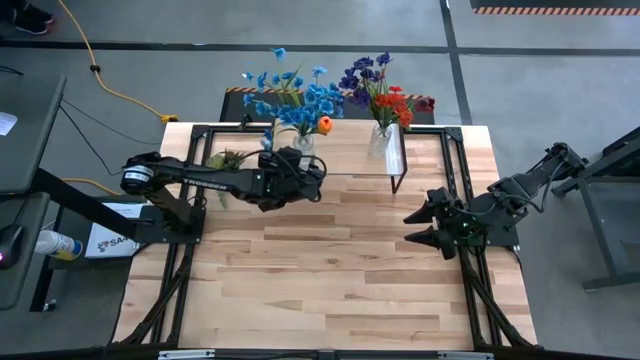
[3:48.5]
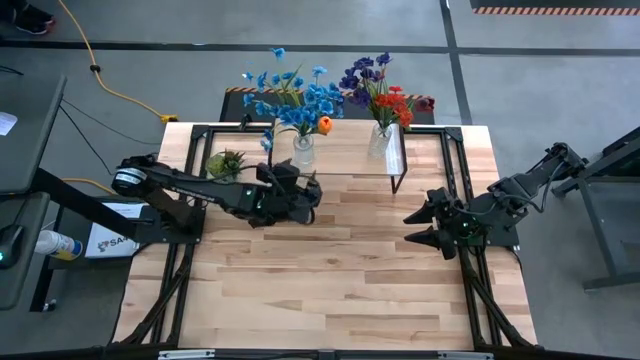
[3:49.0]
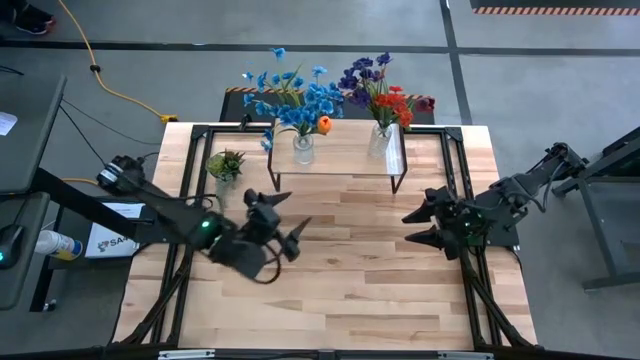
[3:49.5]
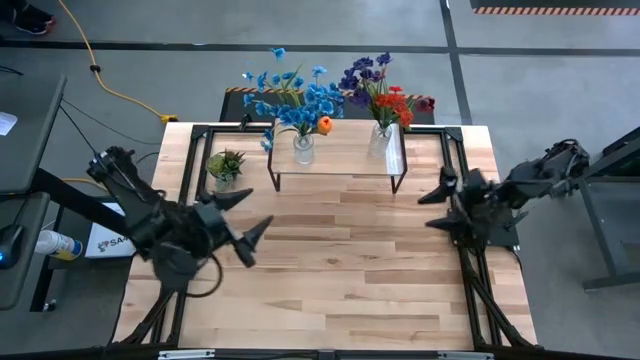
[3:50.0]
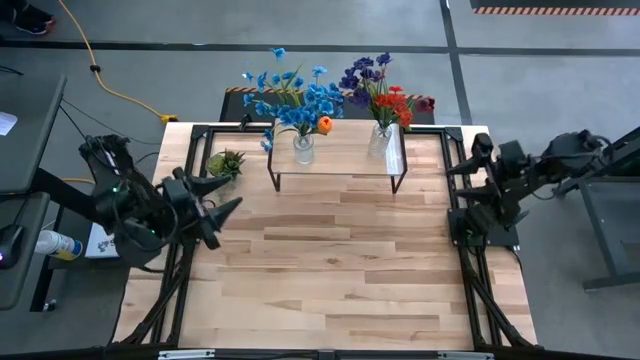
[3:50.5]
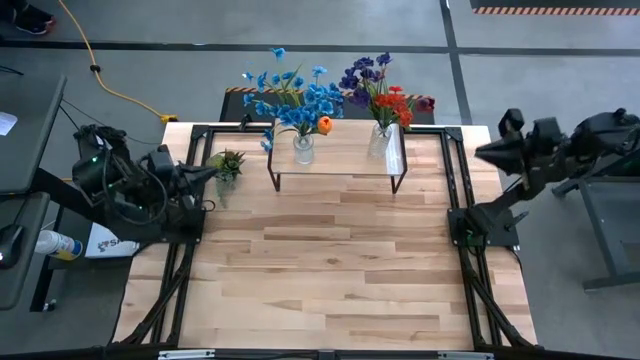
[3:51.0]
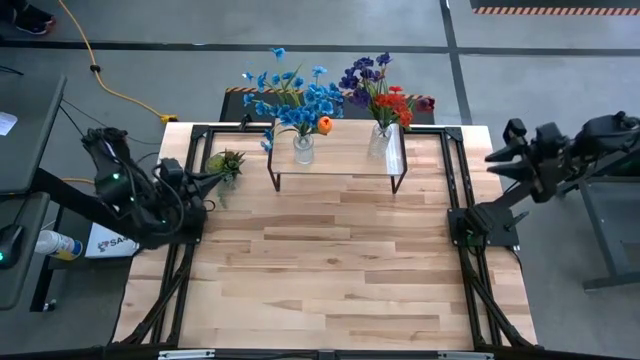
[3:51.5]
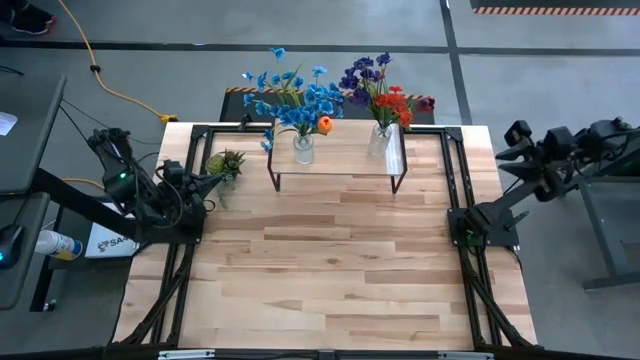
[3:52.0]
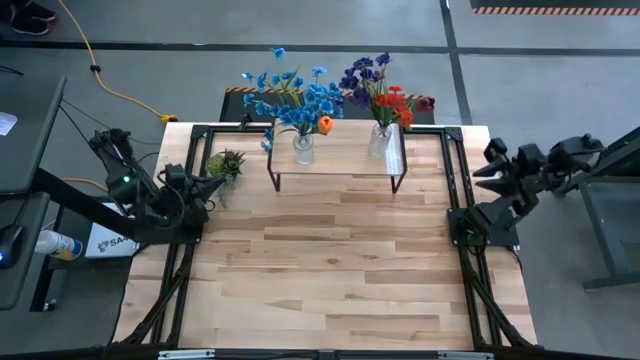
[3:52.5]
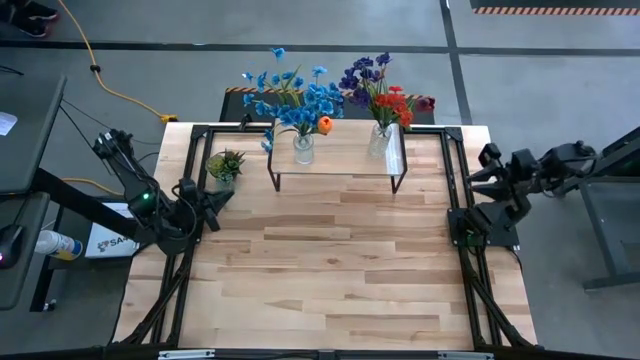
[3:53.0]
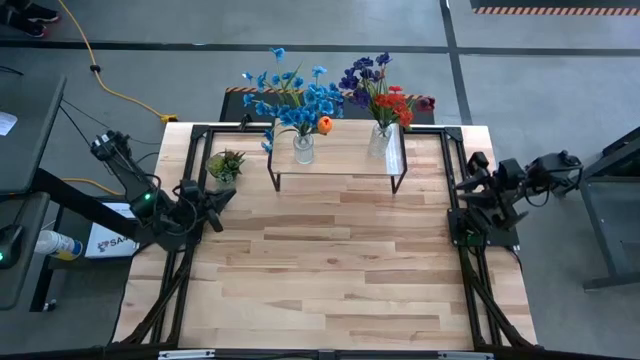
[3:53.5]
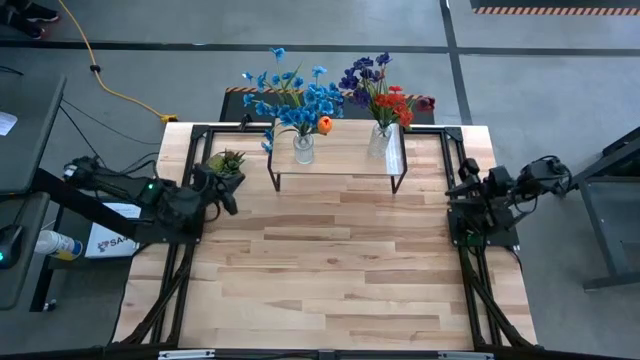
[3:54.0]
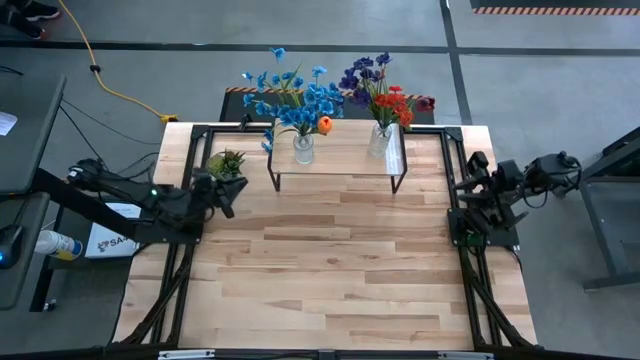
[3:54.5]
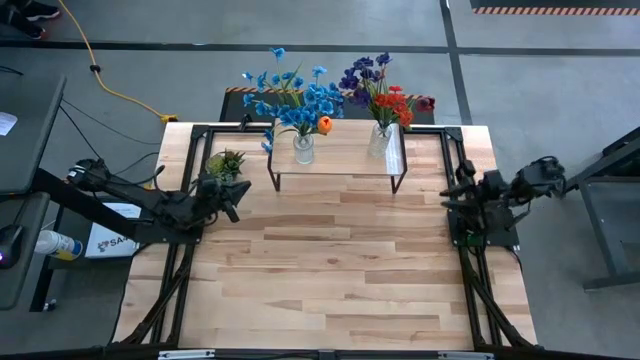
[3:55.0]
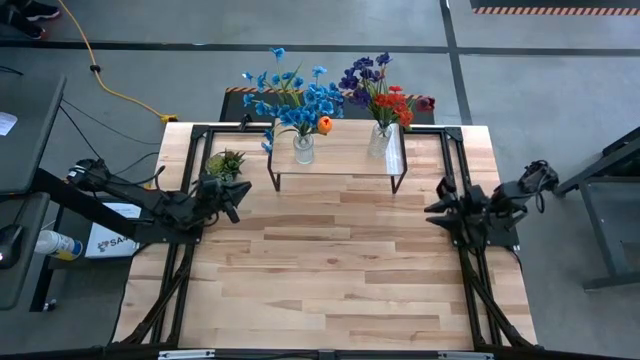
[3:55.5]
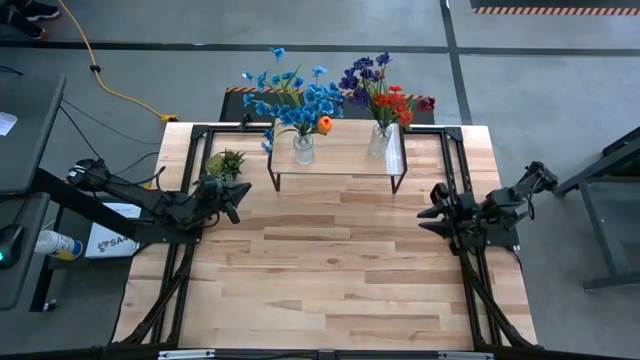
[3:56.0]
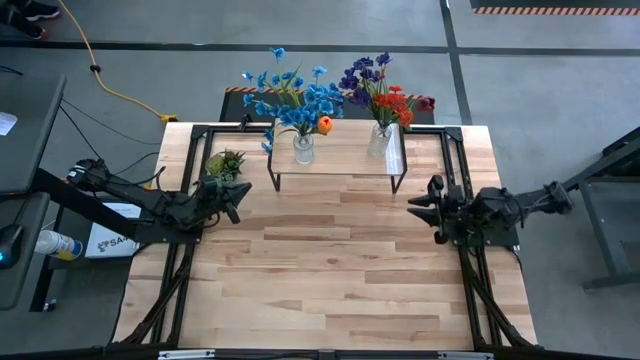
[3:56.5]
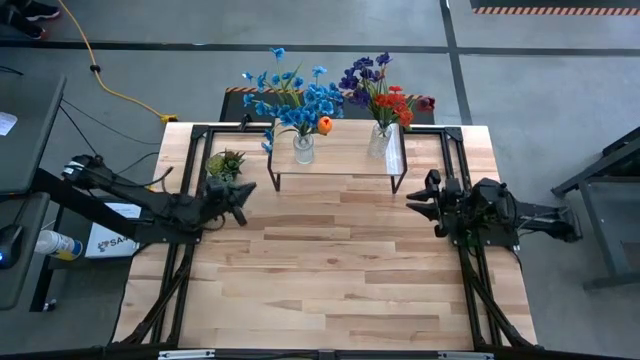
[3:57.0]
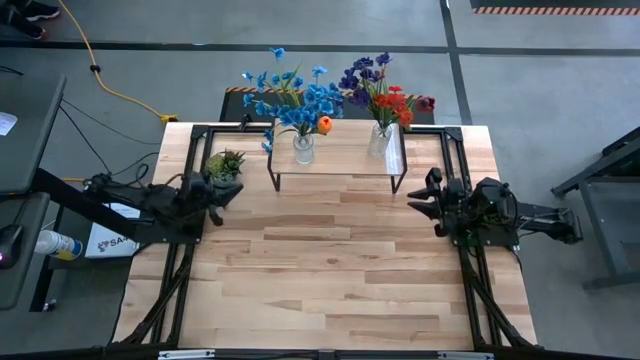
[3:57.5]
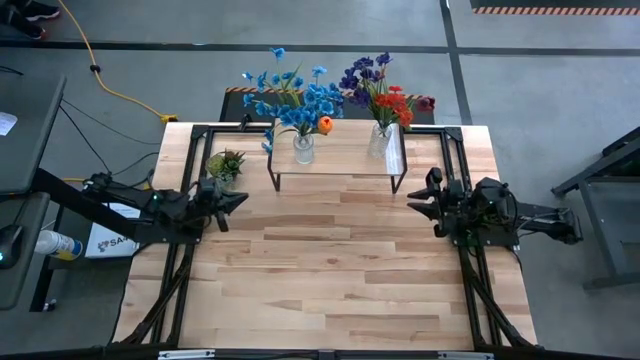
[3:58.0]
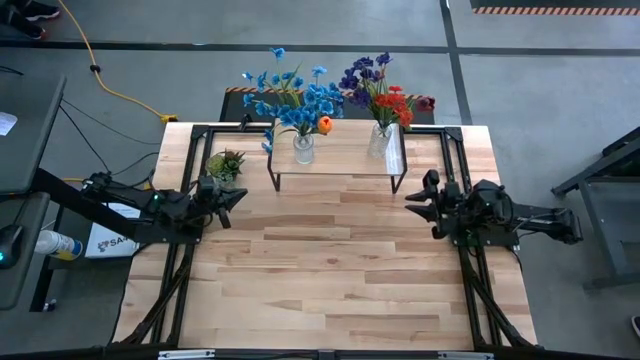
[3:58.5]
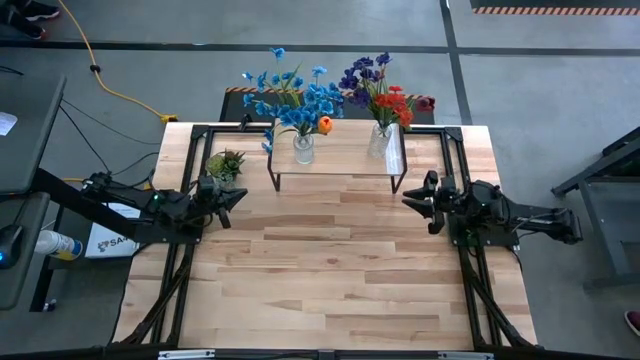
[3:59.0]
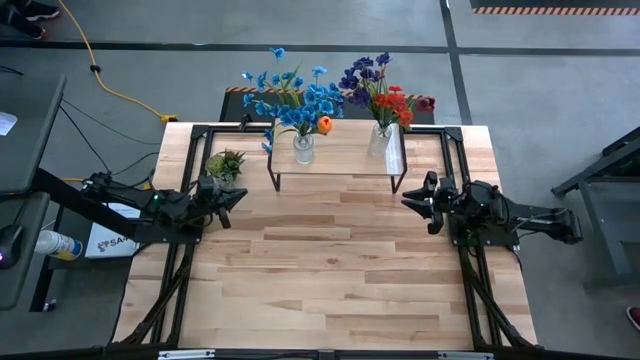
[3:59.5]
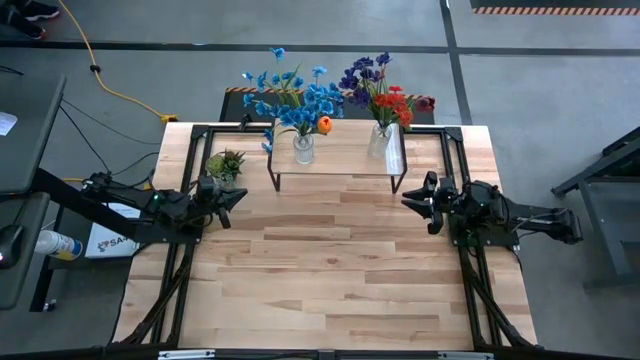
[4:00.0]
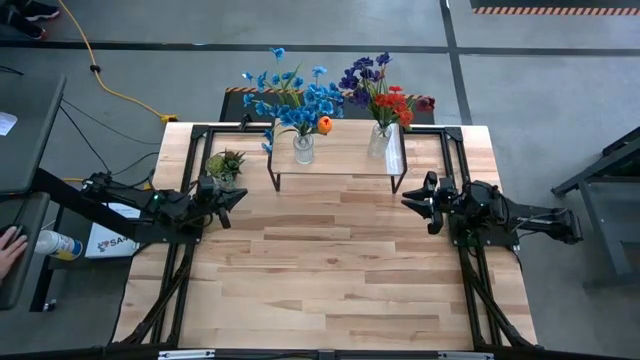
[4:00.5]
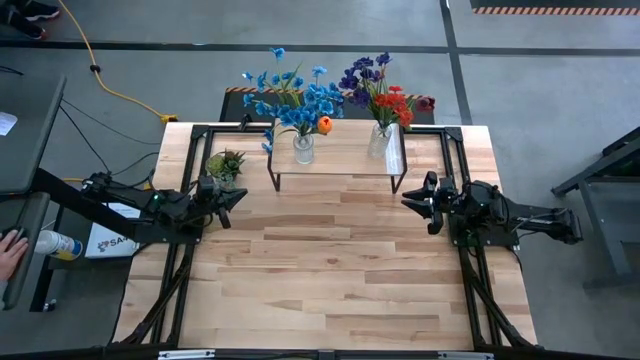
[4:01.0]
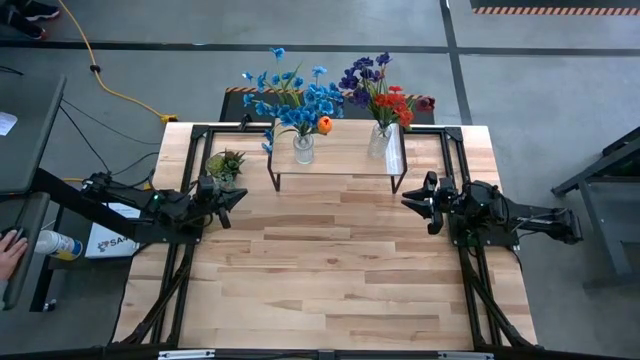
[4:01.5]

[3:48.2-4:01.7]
Task: Pick and place flowers into a vace then onto a shelf
Return To Home Position

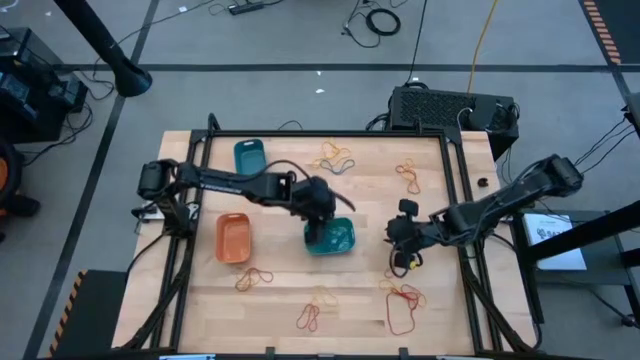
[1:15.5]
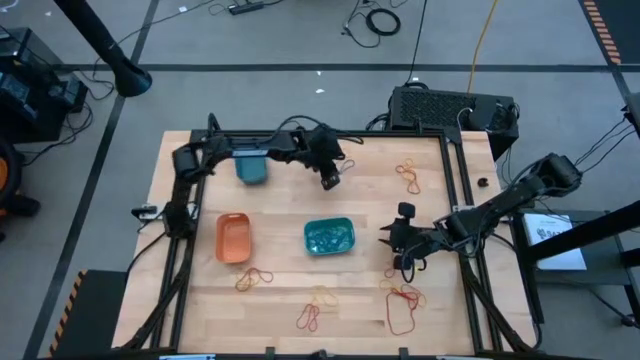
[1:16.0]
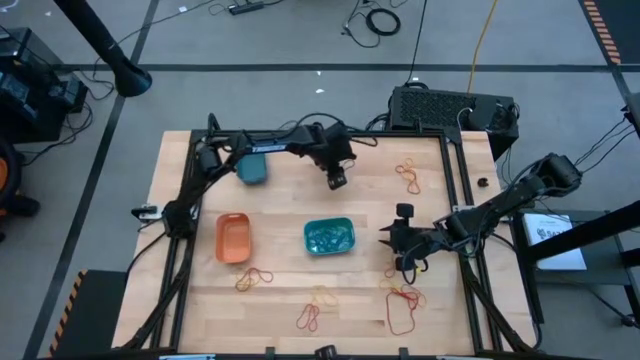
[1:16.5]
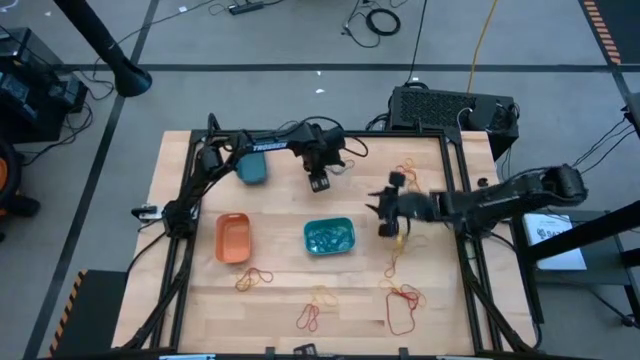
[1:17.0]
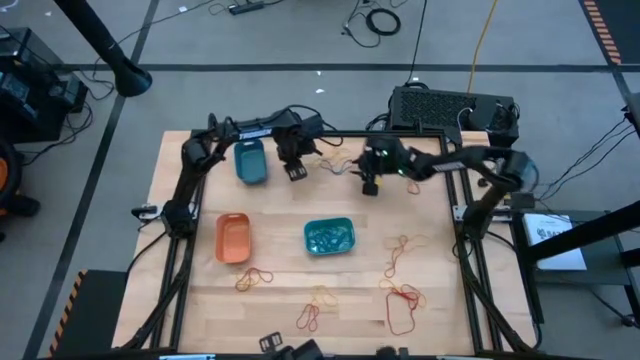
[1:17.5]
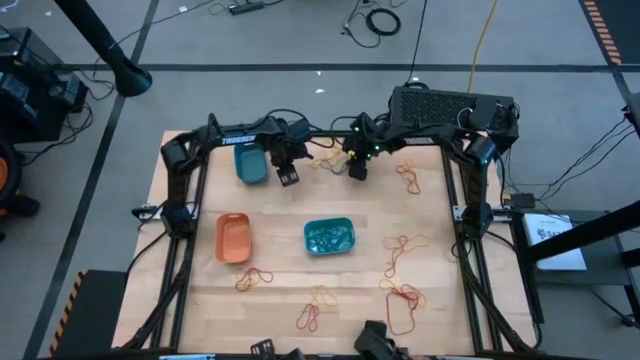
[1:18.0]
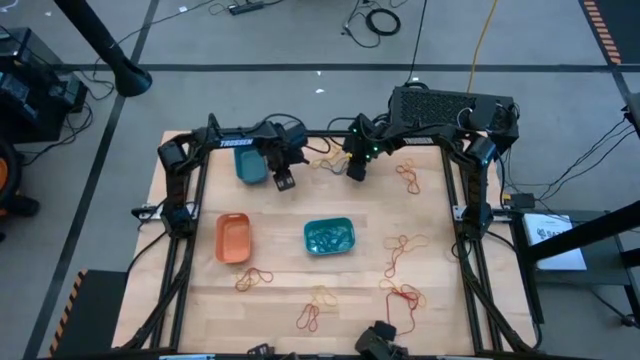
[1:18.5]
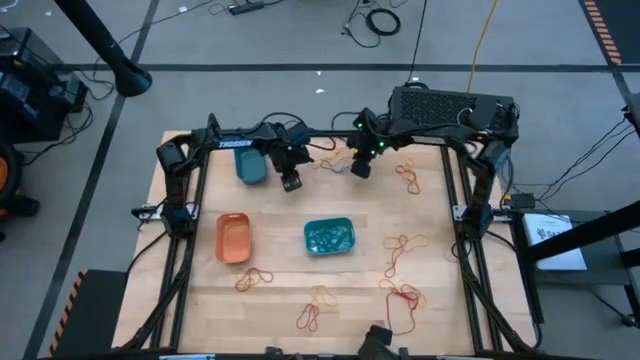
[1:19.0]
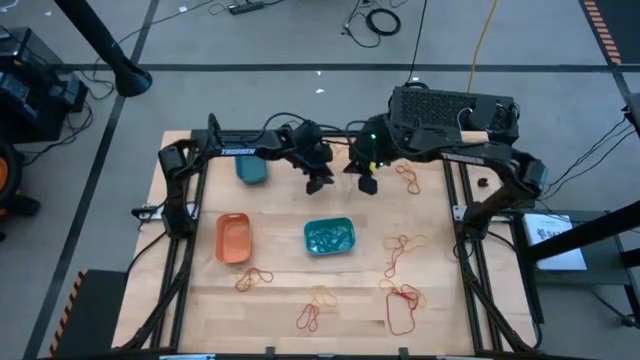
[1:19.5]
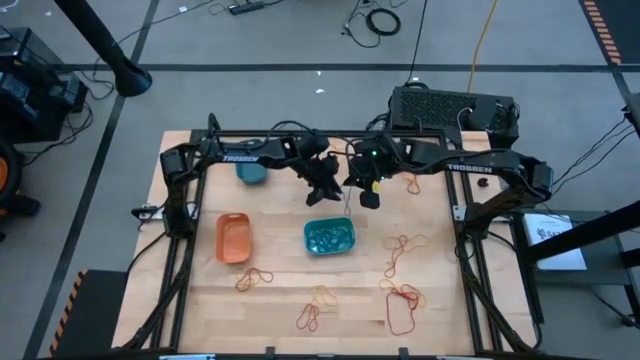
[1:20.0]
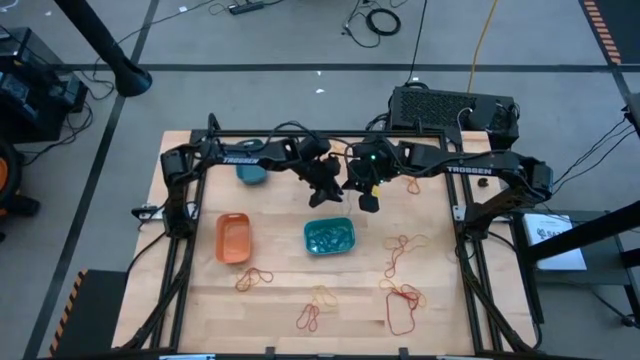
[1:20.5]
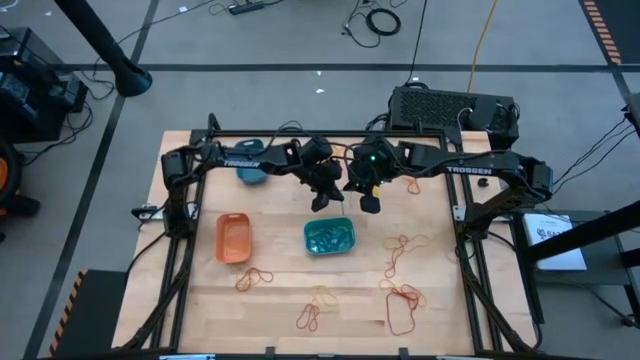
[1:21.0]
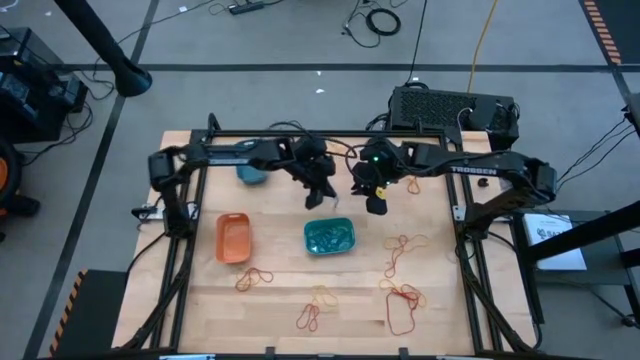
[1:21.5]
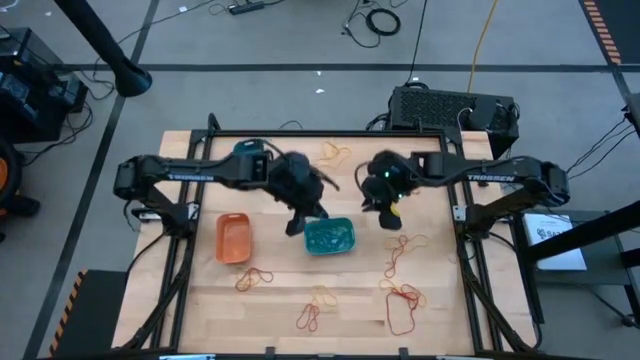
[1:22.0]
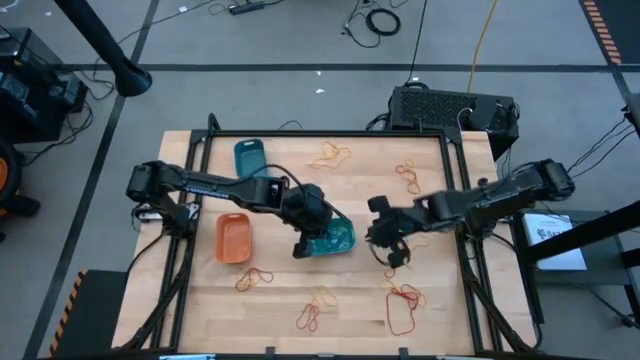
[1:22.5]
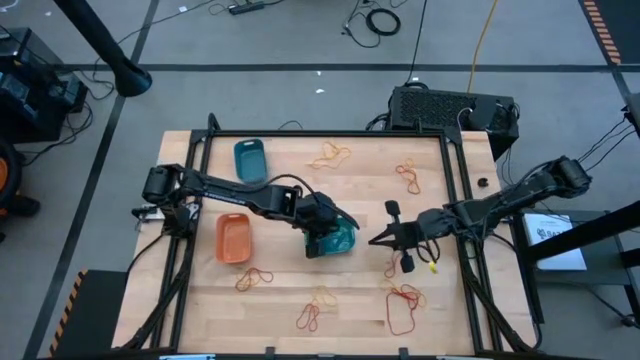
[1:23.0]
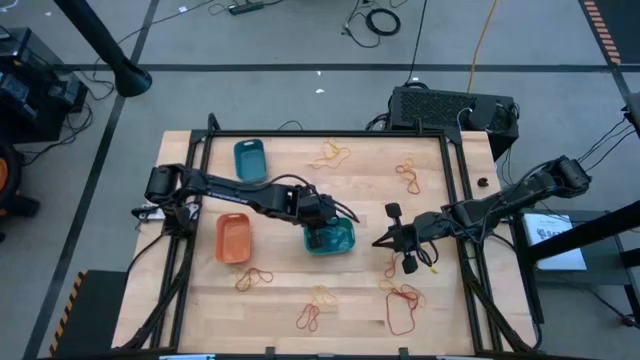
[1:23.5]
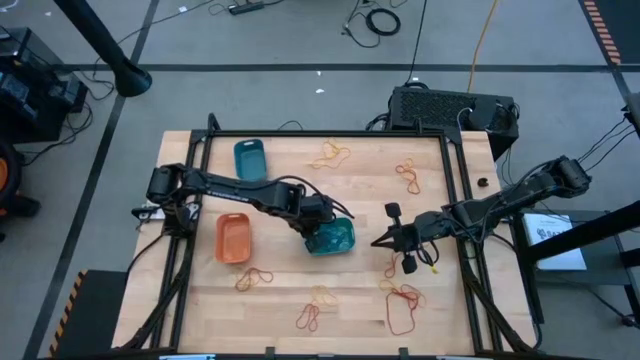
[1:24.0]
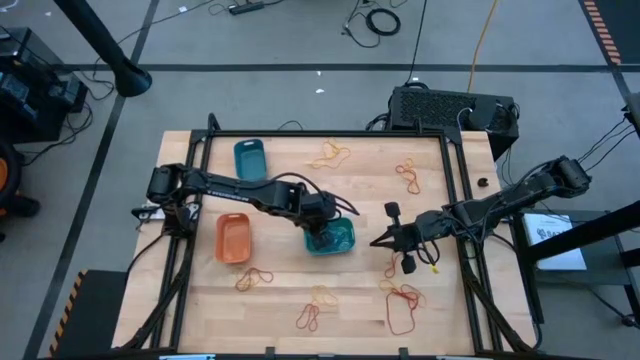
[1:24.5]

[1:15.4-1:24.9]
Task: Sort rubber bands into baskets
Put the blue rubber band into the green bin
